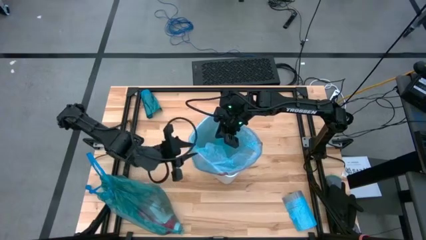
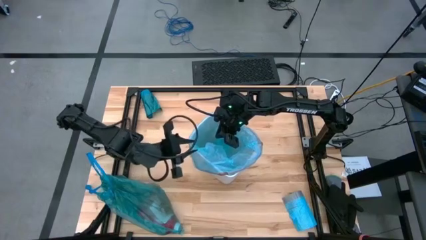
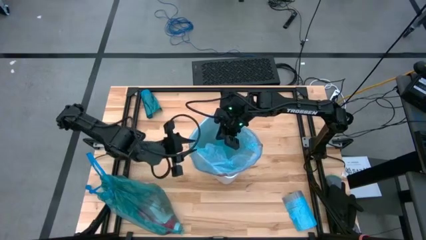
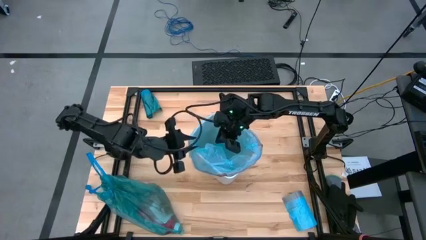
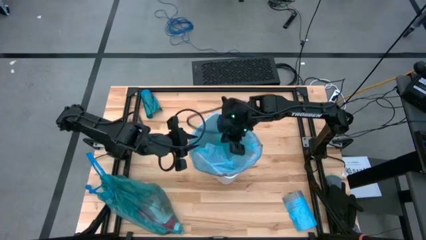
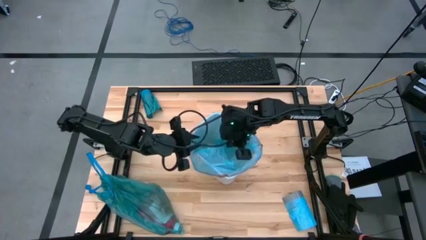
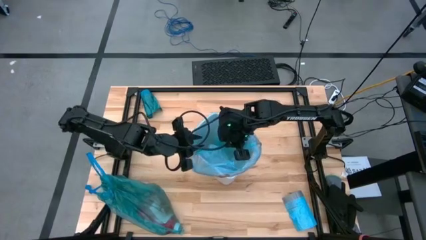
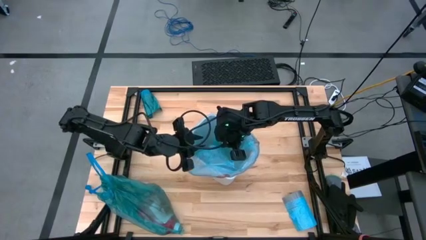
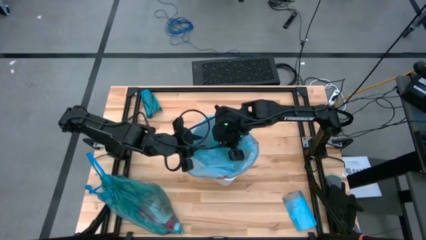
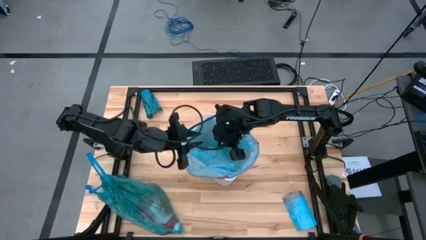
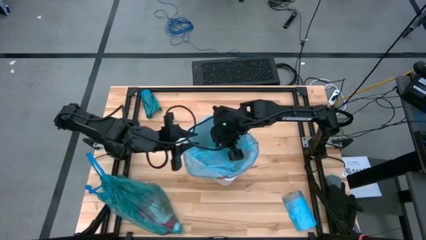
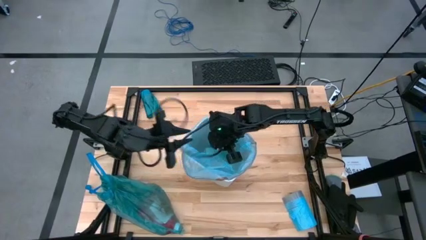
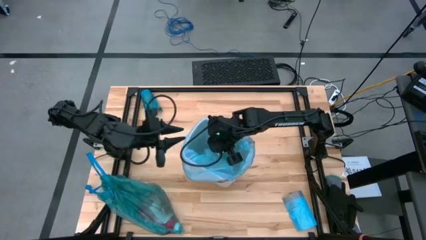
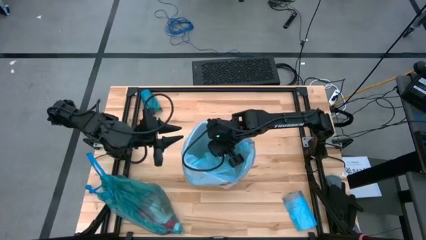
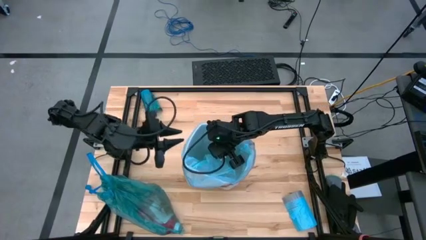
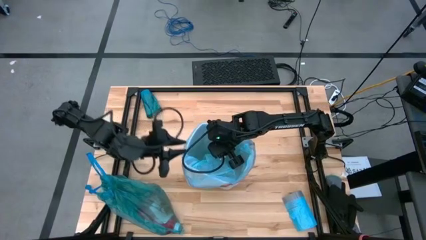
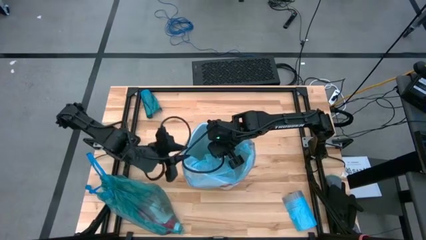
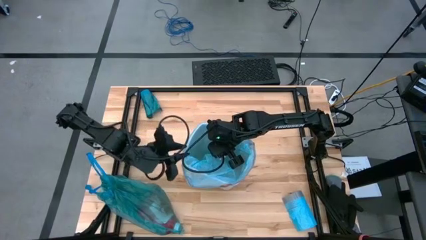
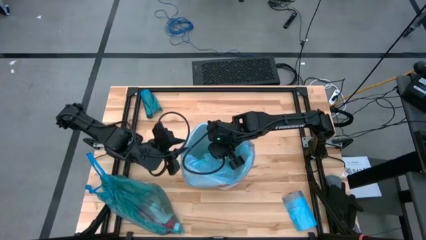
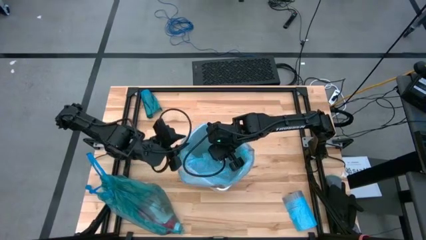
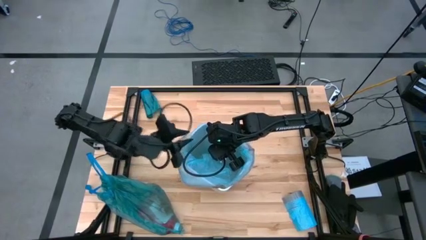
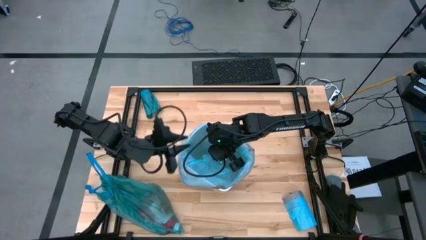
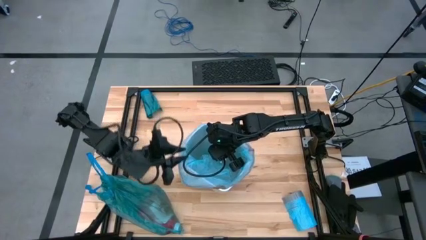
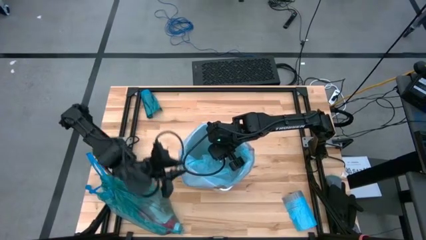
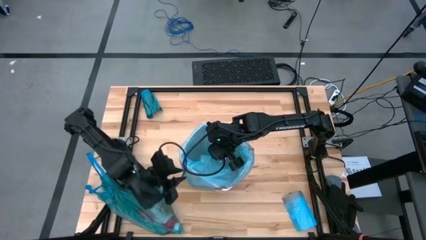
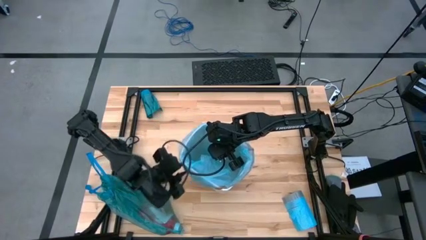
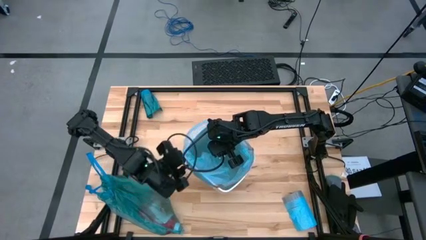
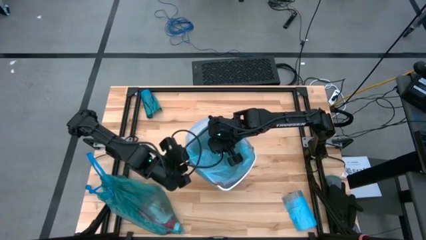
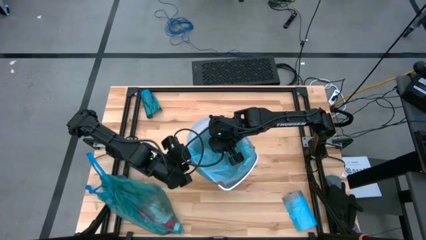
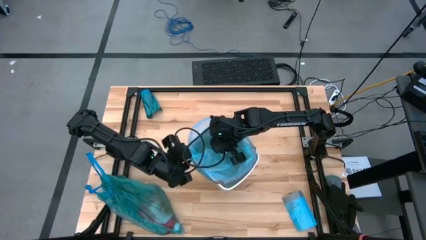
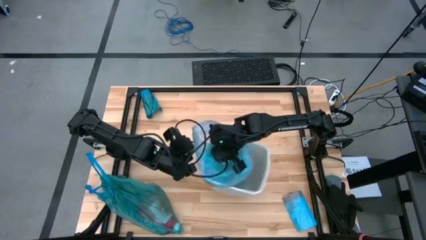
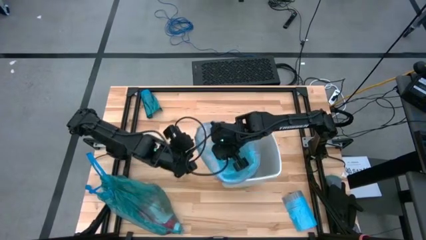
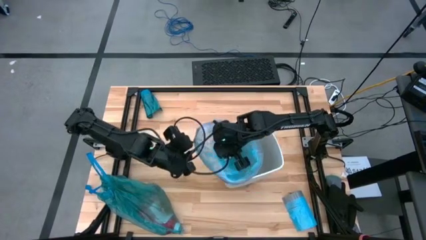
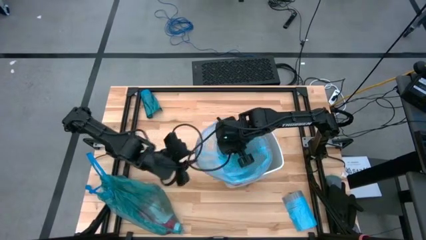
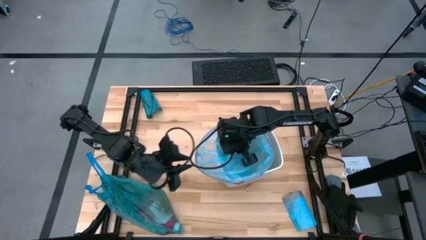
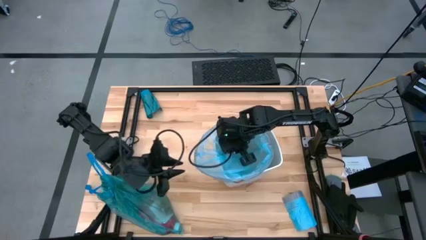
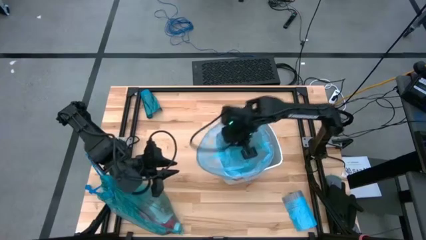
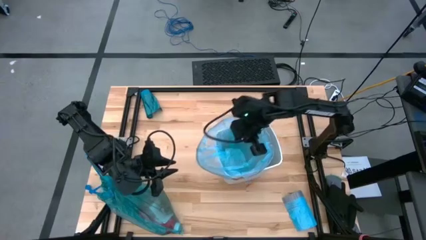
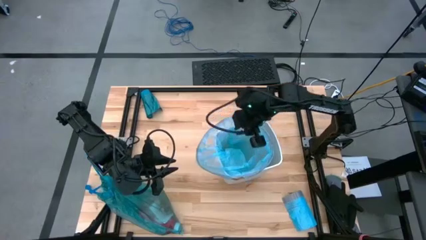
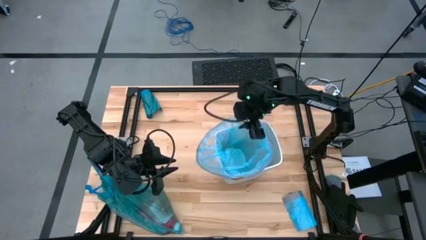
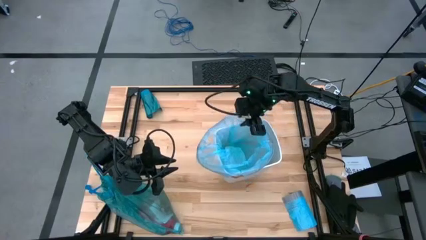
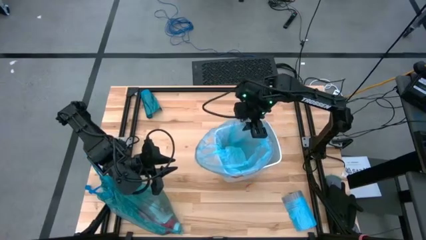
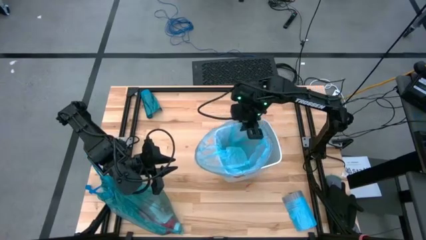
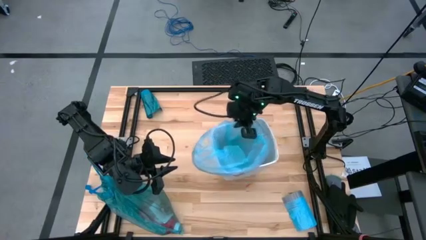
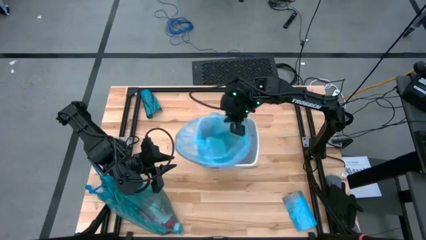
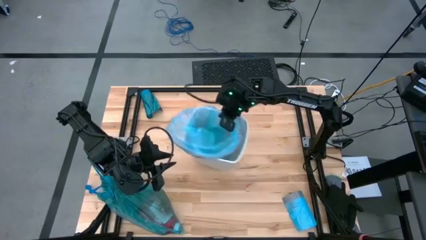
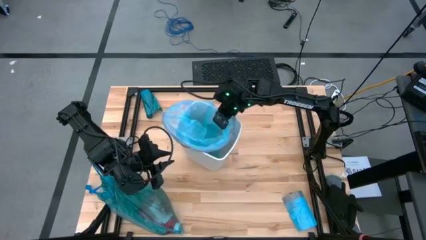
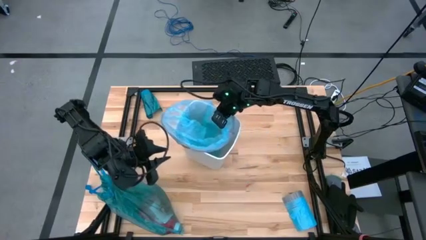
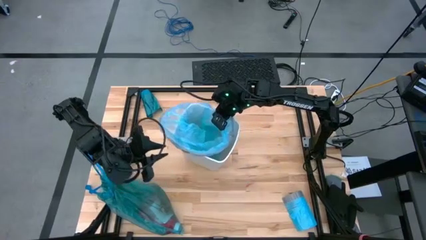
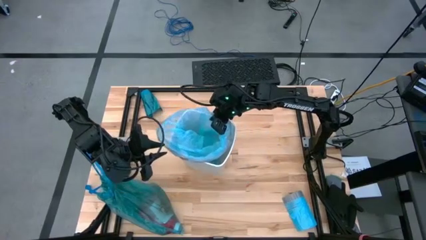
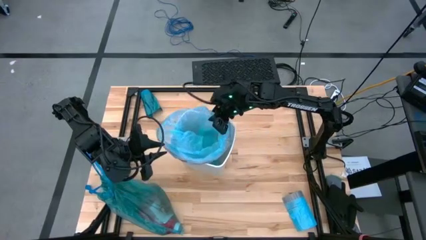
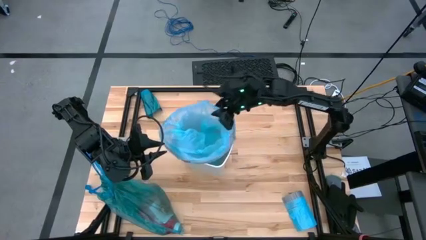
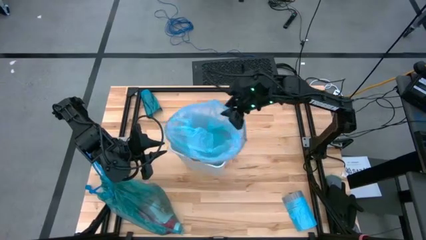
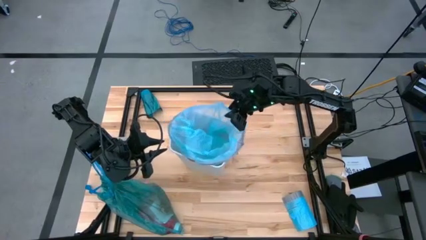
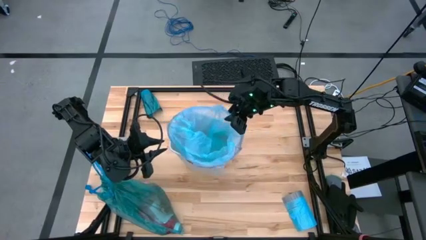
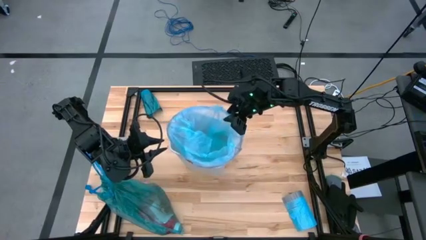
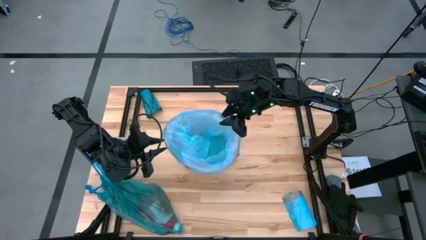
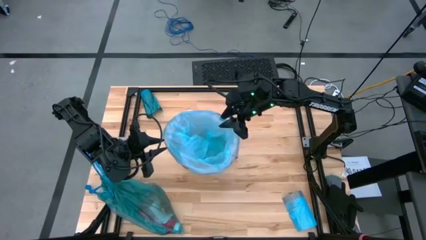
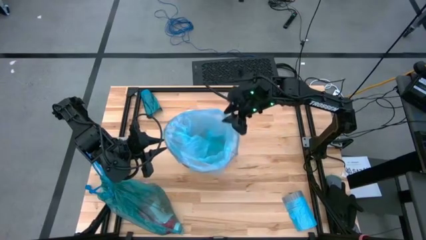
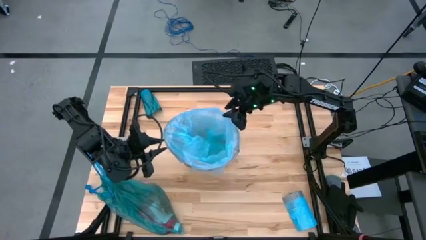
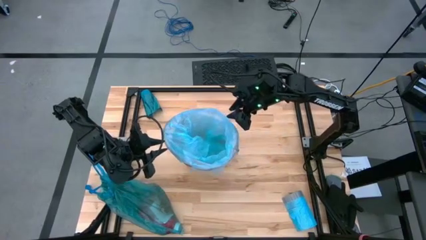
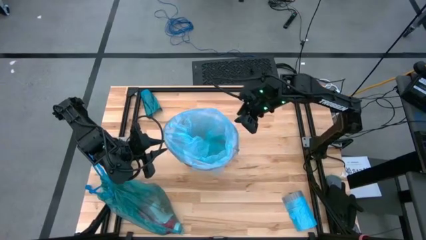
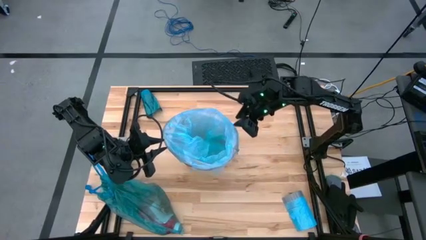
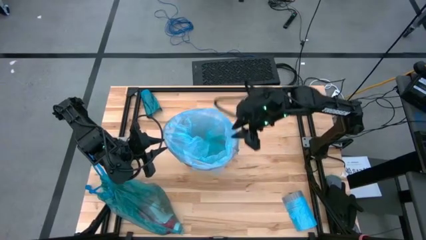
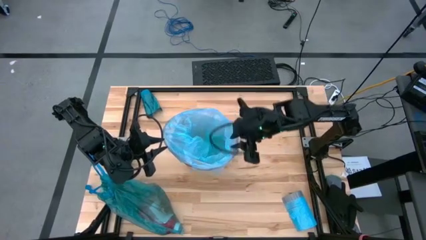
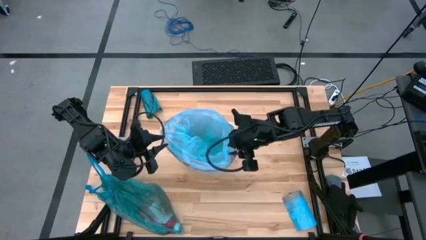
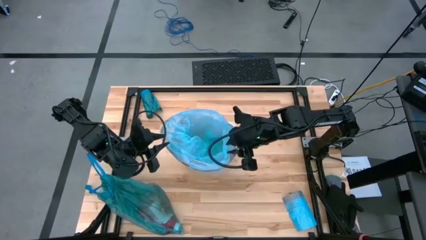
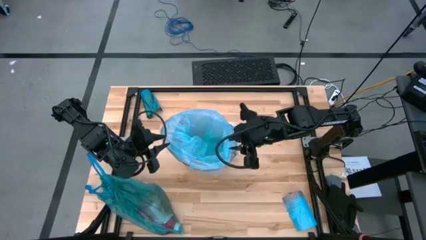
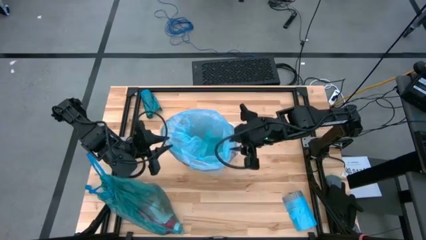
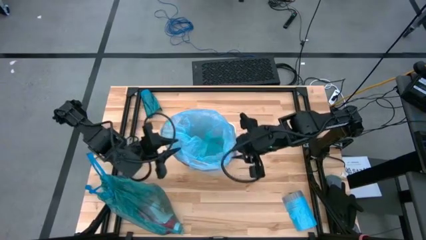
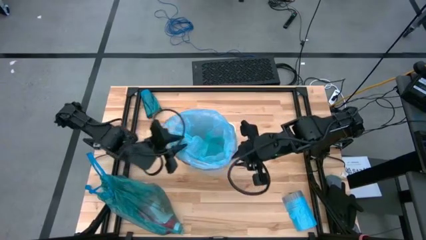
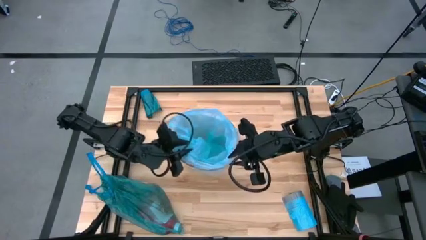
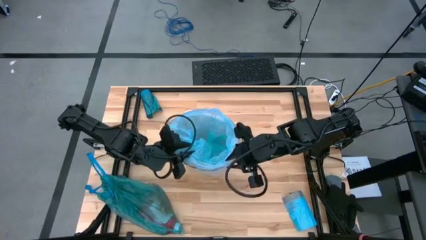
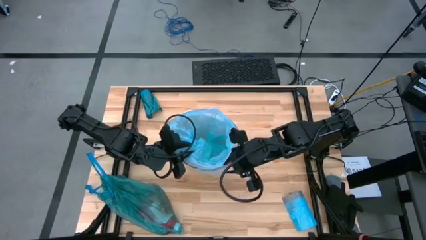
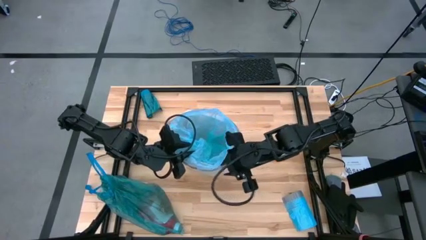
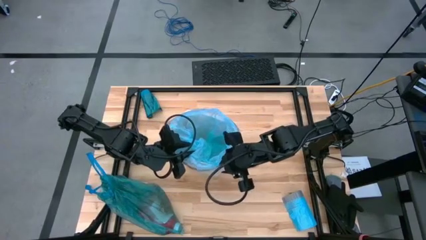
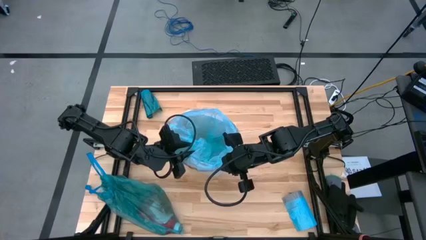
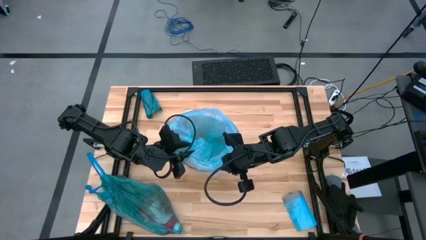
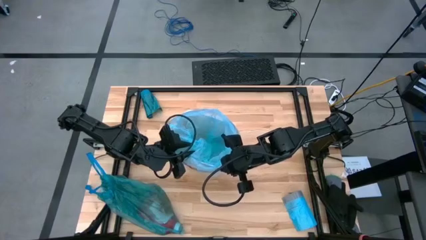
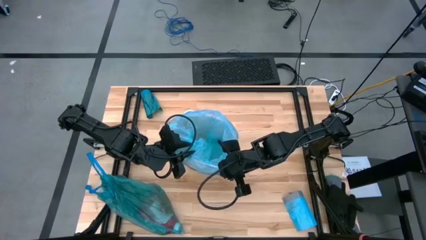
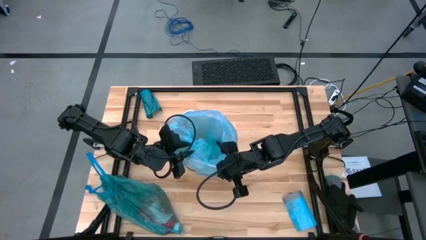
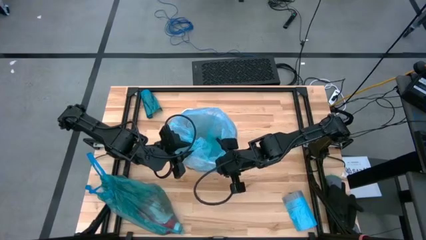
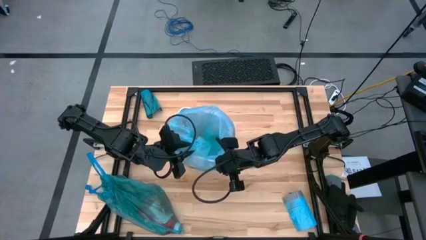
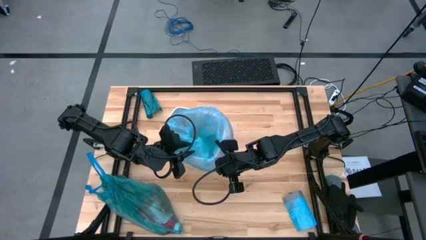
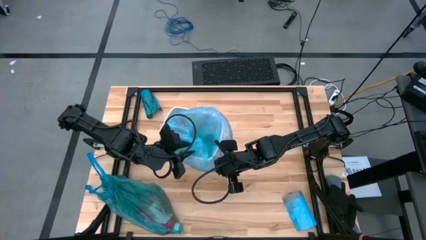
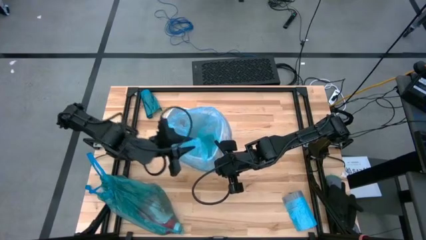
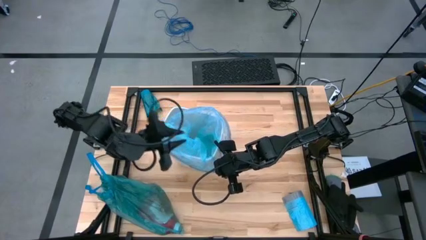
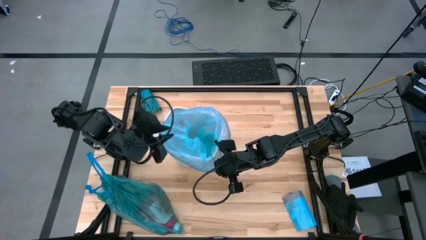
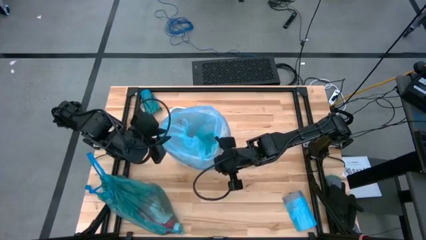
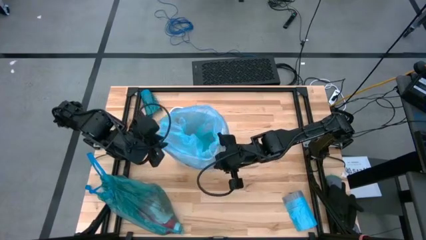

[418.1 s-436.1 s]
Task: place trash/remove bag and relplace
Insert the new blue trash bag into the white trash bin
